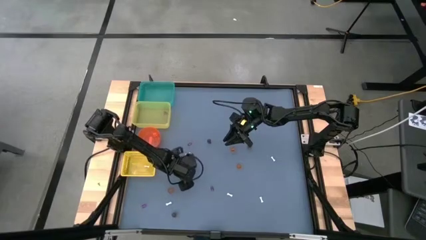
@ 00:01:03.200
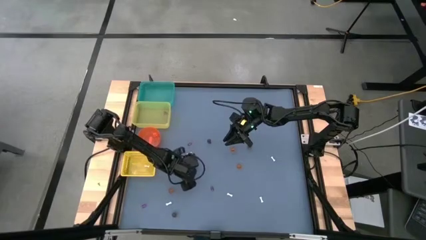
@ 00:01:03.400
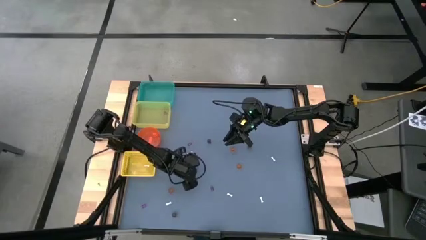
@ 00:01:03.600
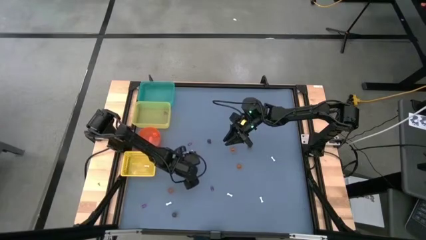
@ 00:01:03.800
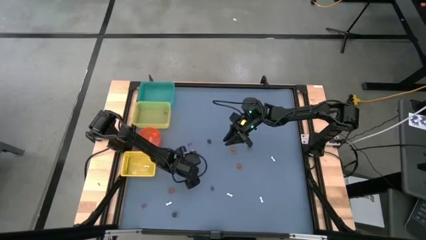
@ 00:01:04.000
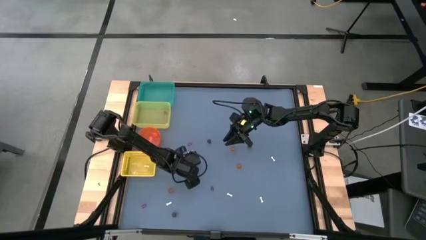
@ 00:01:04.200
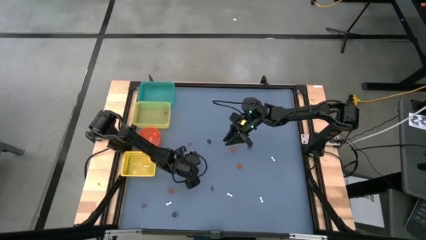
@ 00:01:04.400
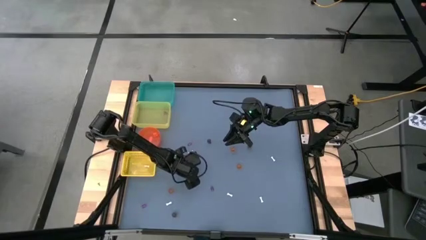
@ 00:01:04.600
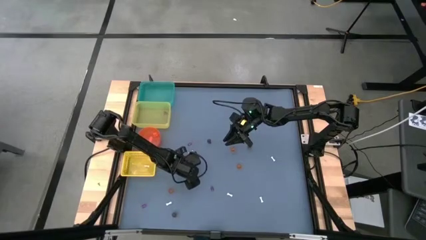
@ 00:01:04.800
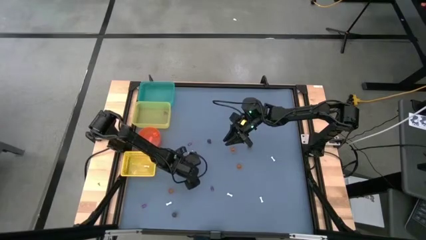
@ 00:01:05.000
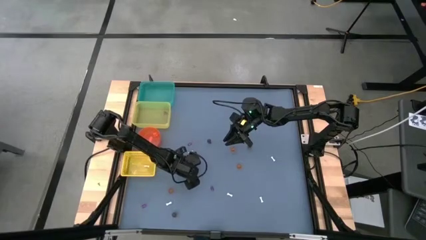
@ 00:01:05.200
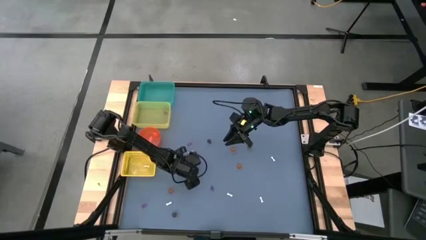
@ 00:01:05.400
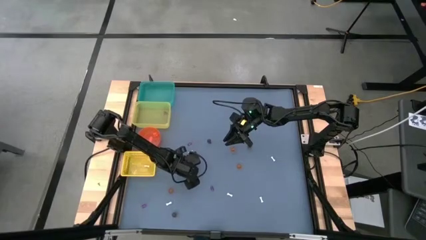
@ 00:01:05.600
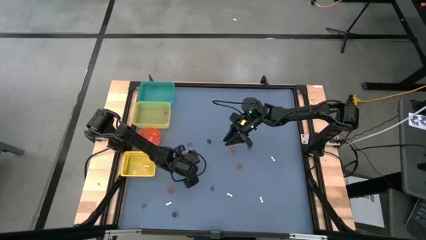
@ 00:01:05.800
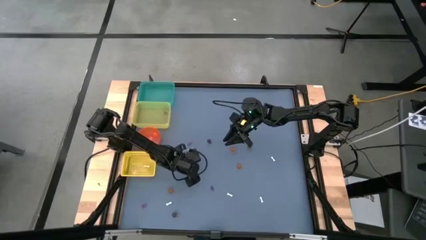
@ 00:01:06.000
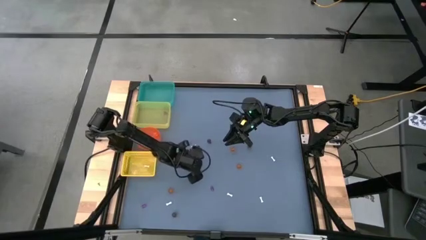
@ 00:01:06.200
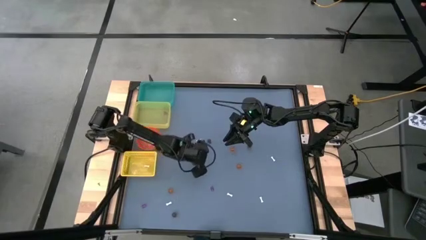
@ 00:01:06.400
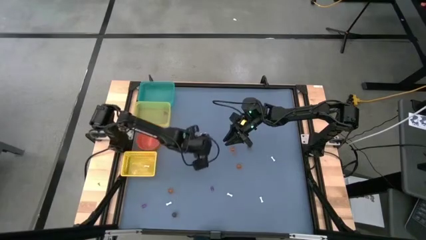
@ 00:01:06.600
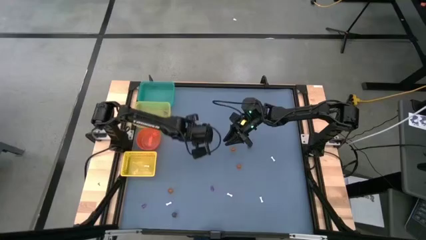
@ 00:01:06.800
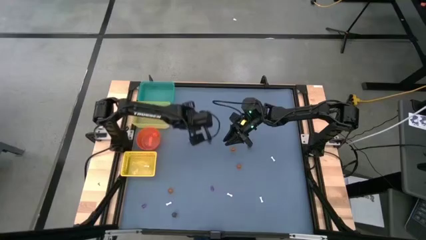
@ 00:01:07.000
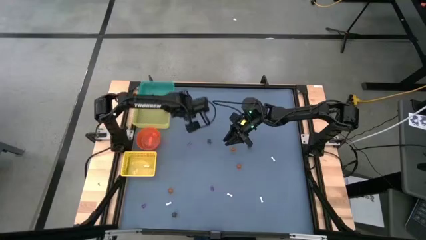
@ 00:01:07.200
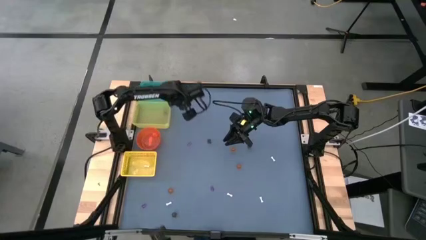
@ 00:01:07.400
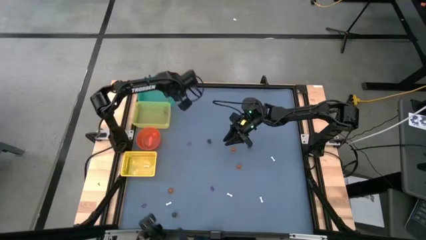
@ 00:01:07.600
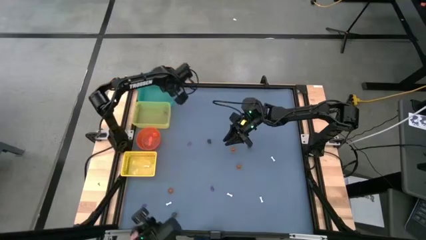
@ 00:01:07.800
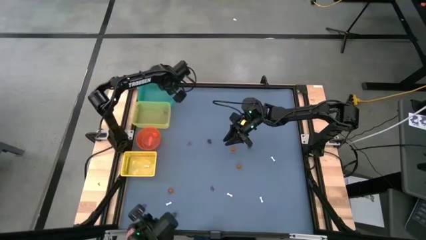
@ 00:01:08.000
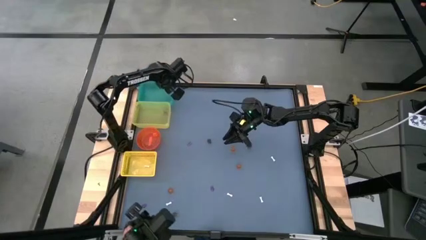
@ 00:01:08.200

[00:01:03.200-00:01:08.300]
Task: Sort Halloween decoration
Put the middle left black skull toy into the green bin

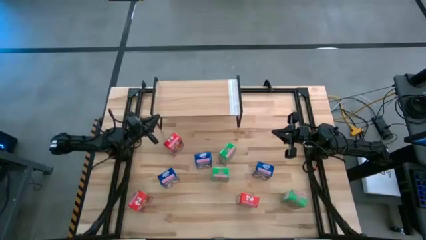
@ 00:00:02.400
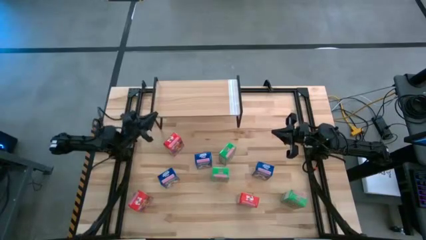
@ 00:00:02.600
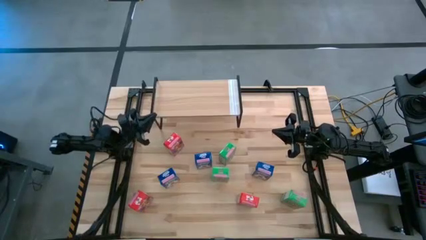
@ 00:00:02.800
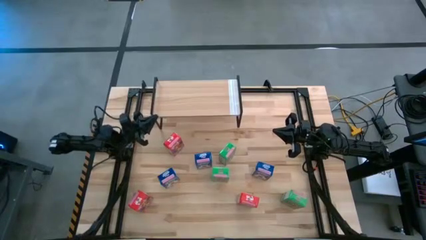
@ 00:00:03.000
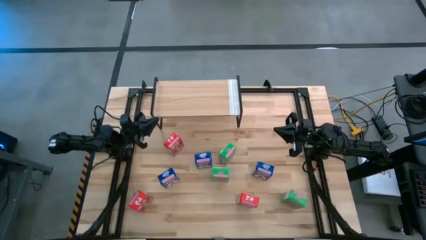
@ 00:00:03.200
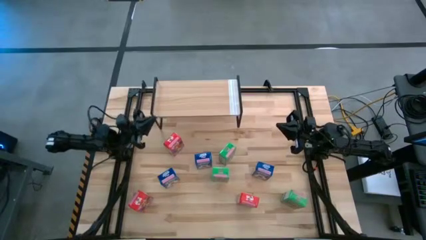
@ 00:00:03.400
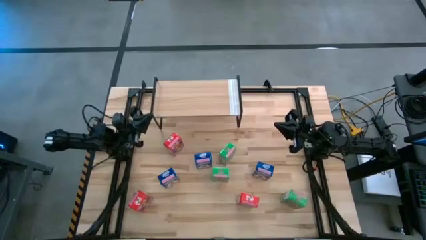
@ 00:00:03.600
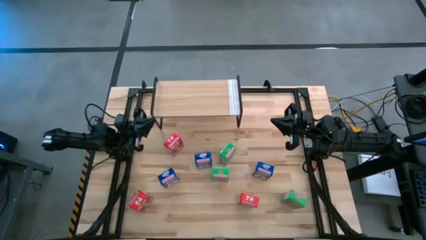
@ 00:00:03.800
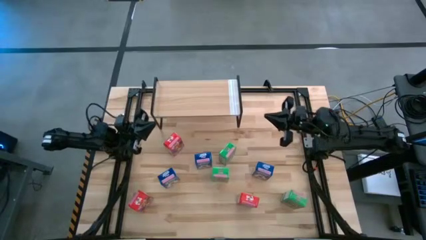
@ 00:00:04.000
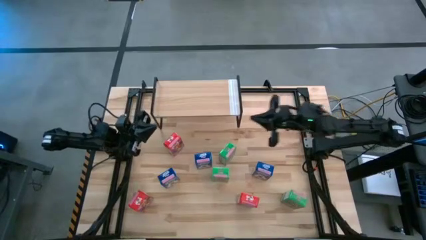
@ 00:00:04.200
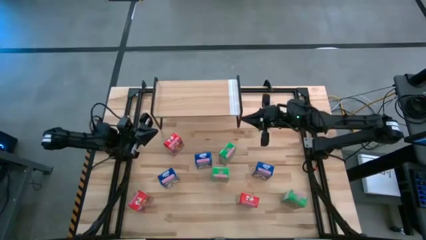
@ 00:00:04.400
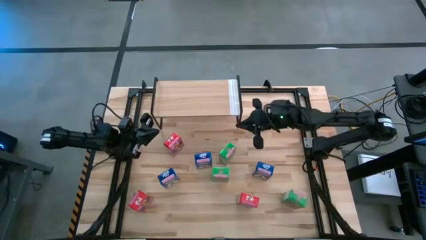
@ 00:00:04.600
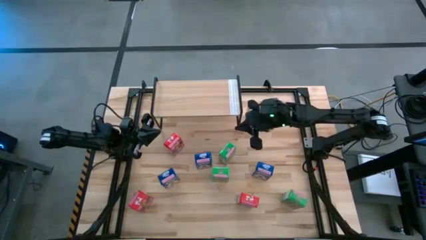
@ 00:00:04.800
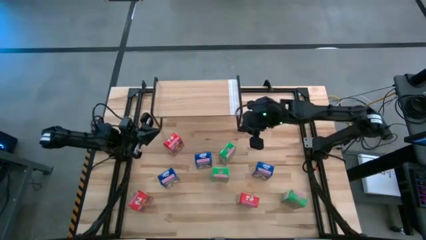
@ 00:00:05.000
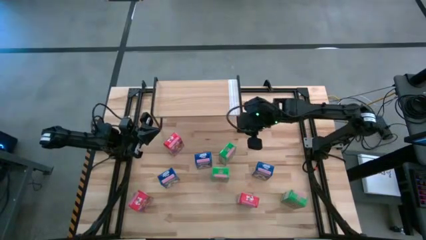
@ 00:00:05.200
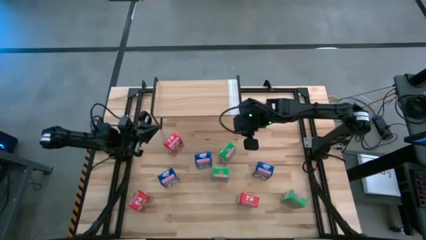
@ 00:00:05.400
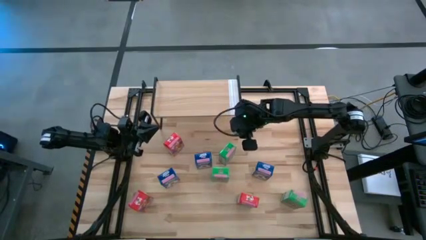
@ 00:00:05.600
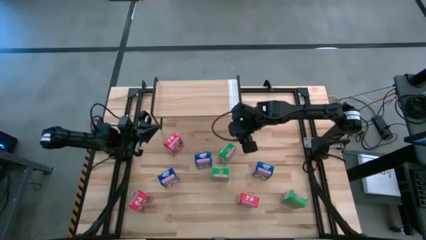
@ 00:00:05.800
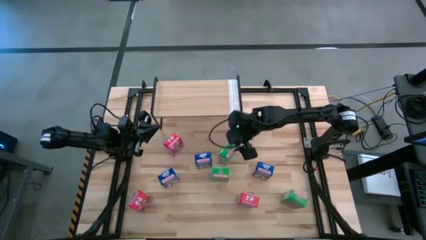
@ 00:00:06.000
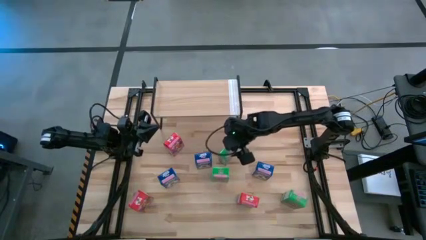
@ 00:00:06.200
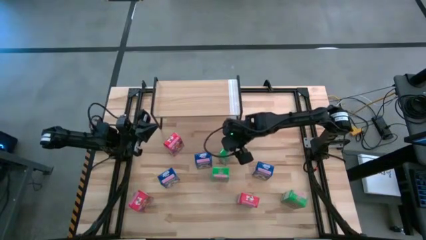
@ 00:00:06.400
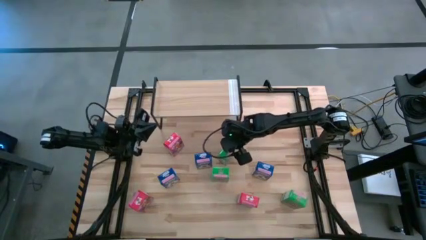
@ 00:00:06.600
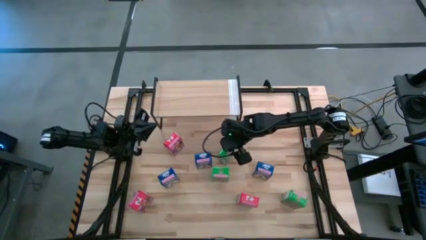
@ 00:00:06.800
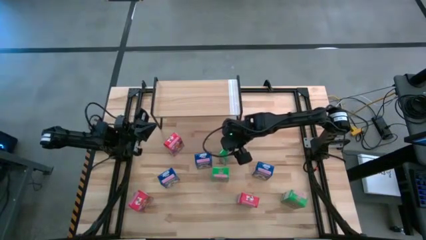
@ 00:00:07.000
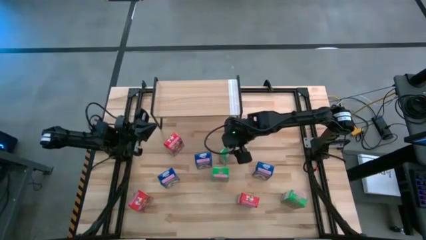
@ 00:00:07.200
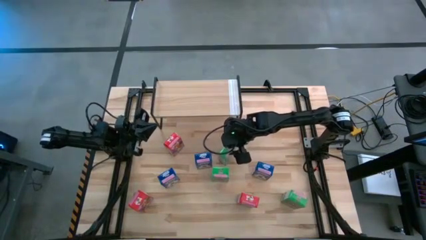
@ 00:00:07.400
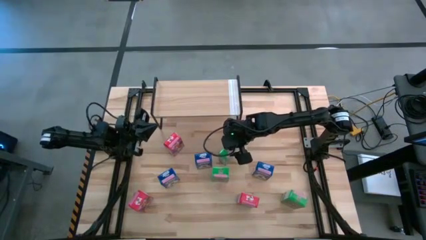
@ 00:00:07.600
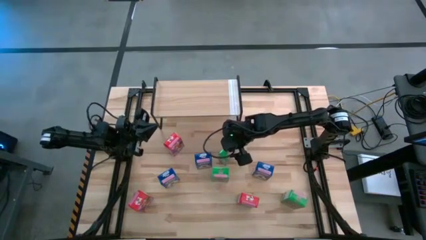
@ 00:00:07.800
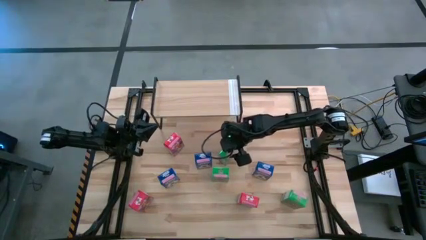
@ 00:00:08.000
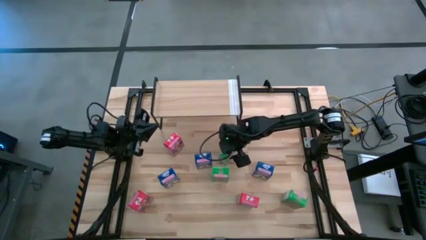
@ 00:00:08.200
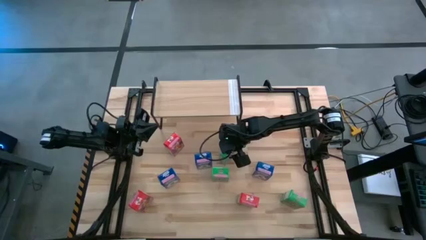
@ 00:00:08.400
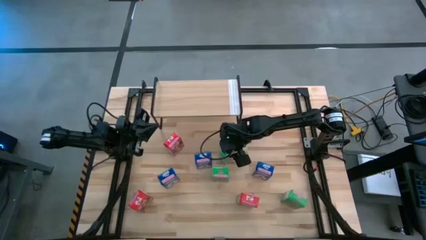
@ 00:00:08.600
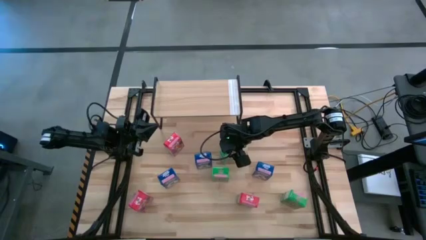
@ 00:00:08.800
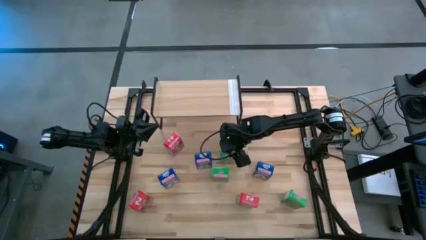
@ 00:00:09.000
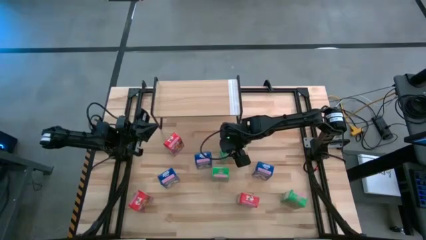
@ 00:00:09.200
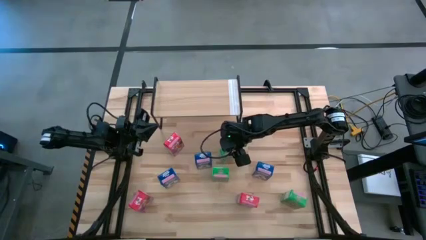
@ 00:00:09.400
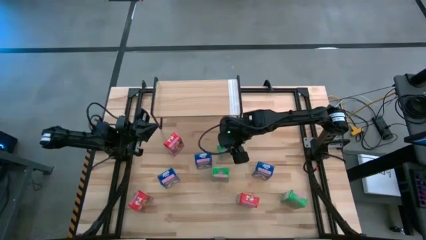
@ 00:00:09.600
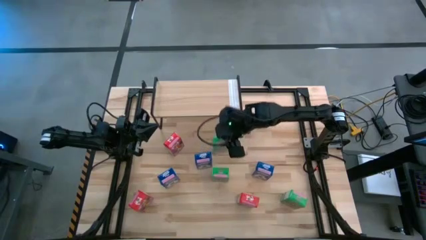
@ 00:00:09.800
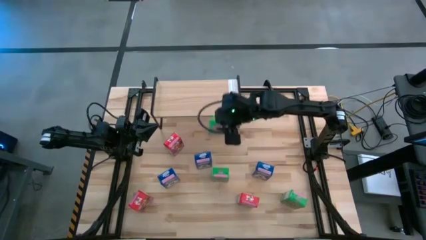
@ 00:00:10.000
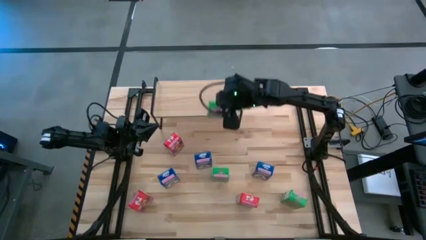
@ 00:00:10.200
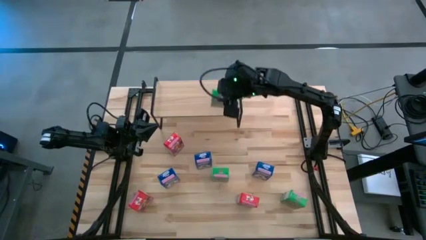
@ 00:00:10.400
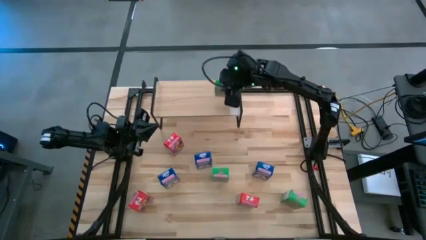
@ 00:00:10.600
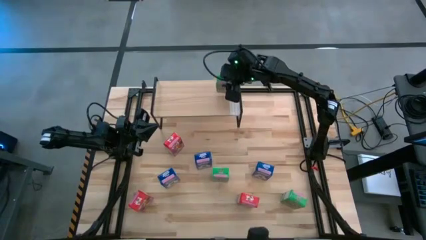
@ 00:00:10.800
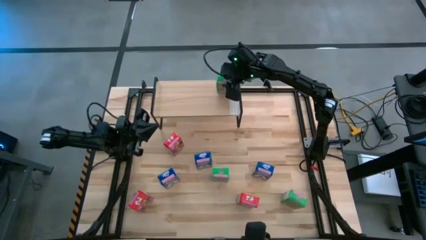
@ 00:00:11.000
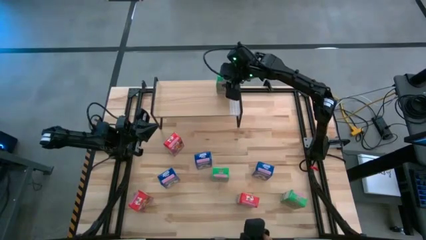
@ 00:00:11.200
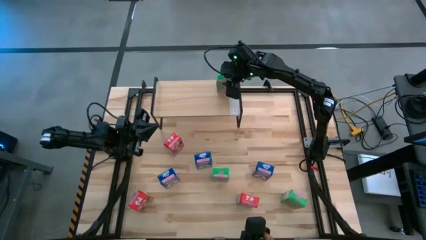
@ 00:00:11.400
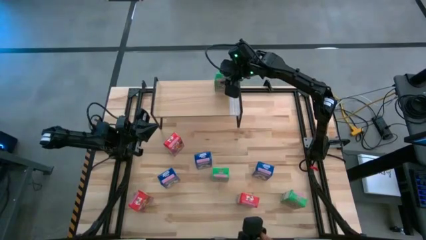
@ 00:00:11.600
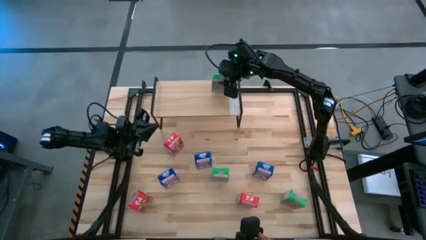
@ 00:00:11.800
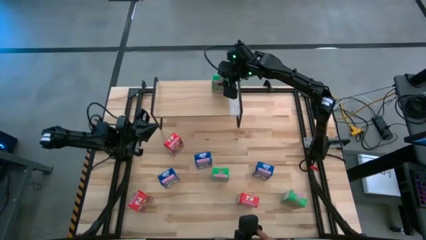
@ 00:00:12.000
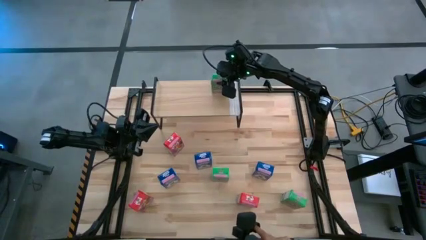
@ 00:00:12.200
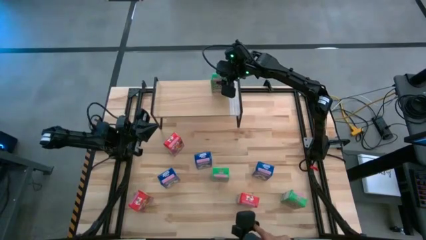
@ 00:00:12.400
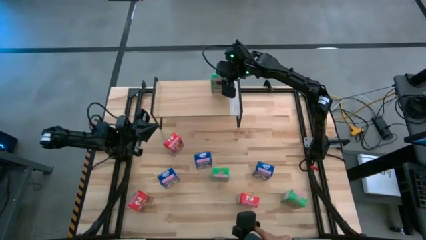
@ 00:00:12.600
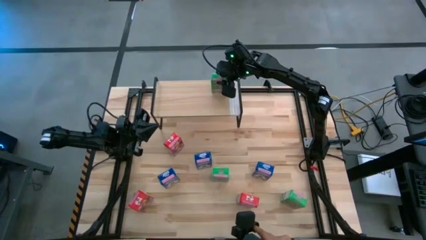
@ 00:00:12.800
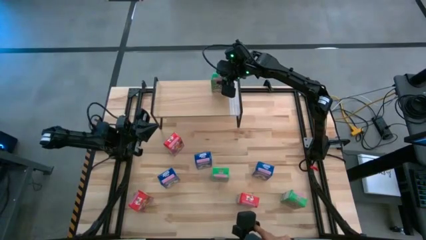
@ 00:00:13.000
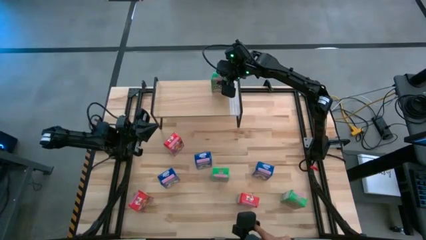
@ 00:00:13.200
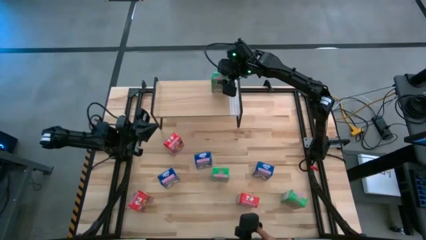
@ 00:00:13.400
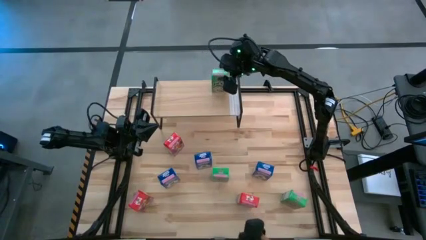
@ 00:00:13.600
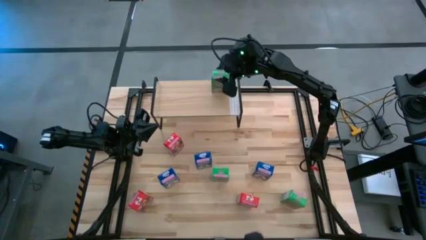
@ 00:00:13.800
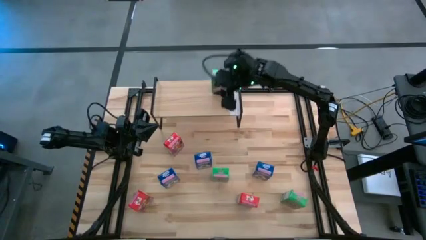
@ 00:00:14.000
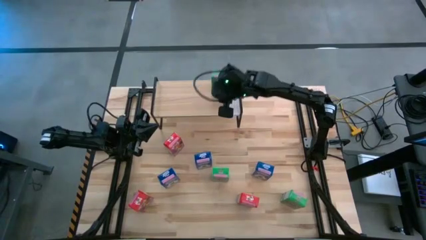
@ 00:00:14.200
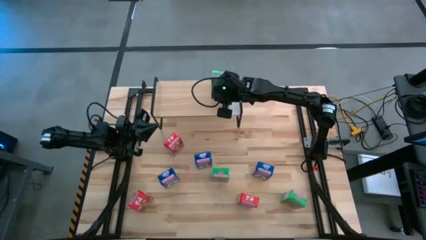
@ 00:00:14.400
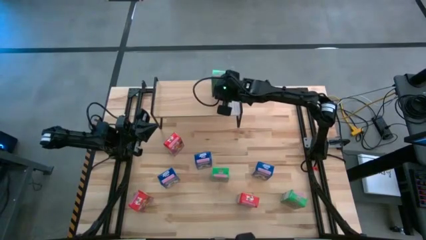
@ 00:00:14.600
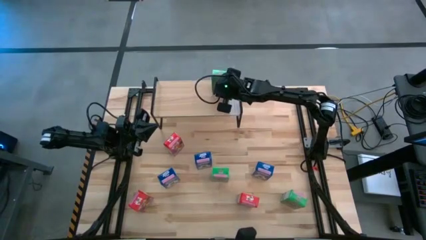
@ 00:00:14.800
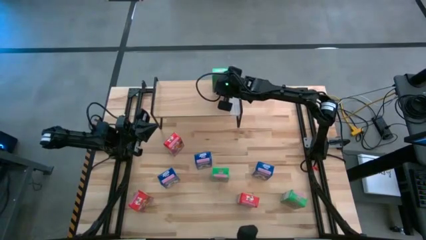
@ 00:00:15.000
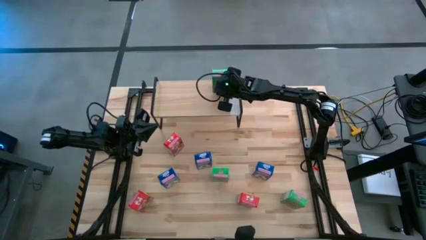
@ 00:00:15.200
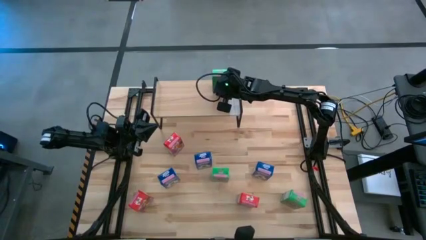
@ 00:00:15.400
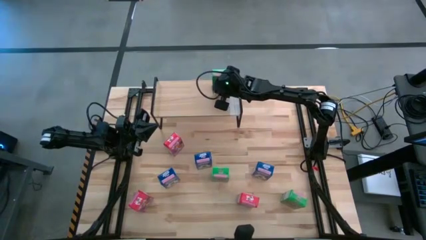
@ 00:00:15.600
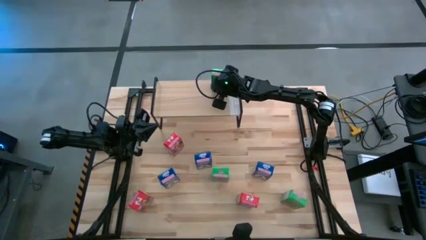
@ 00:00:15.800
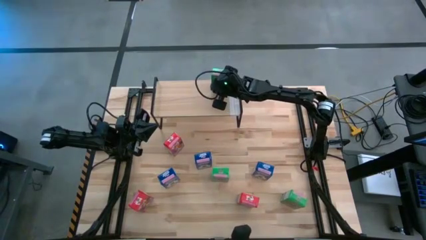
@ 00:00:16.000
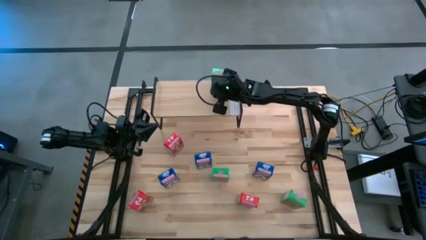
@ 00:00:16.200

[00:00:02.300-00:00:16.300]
Task: Stack cereal on shelf
Put the top green cereal box on the shelf
